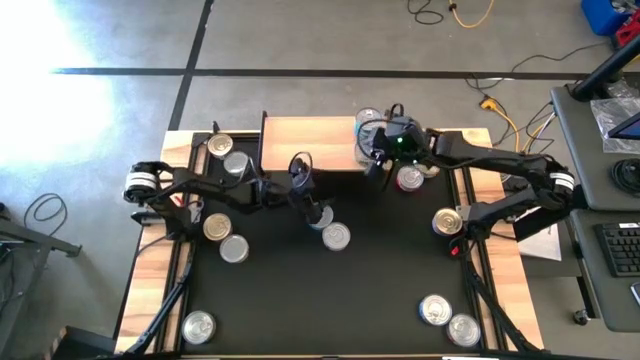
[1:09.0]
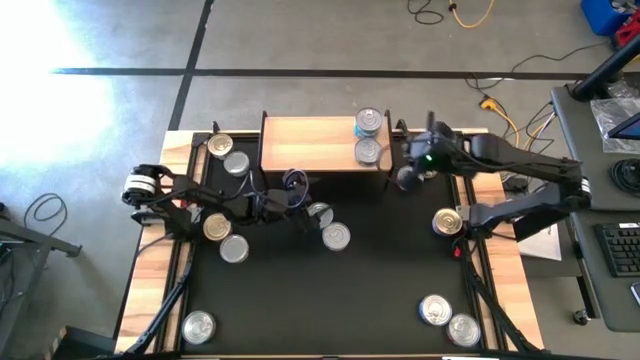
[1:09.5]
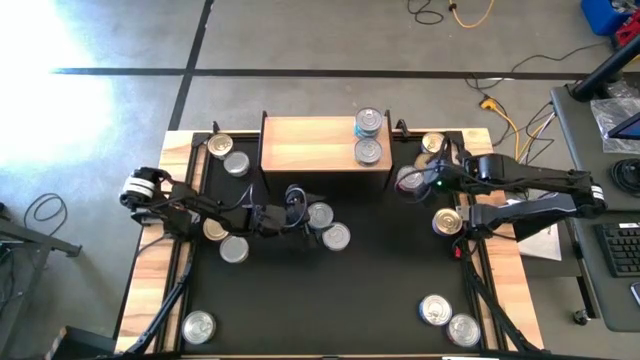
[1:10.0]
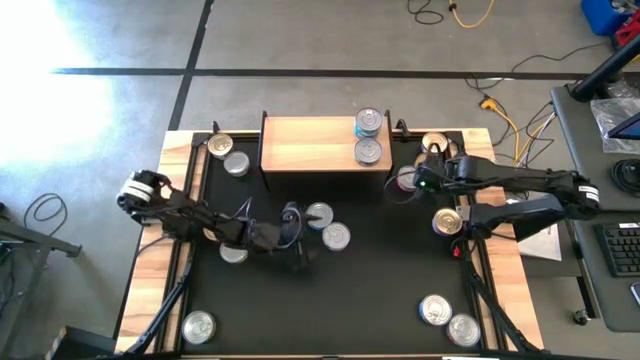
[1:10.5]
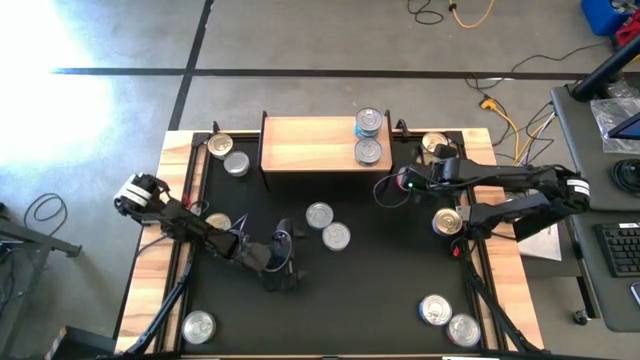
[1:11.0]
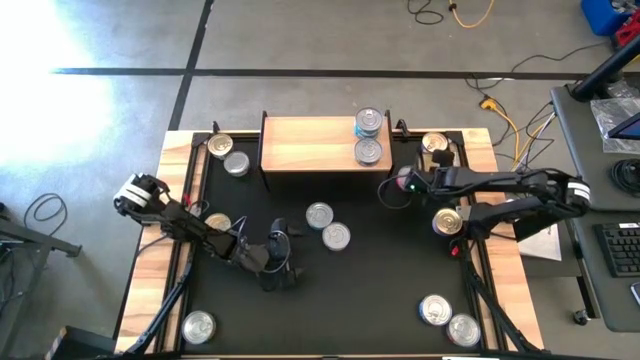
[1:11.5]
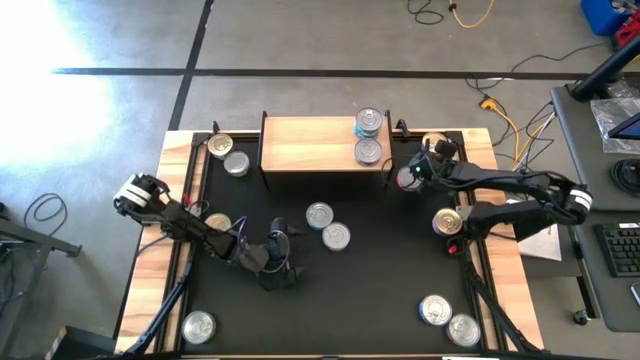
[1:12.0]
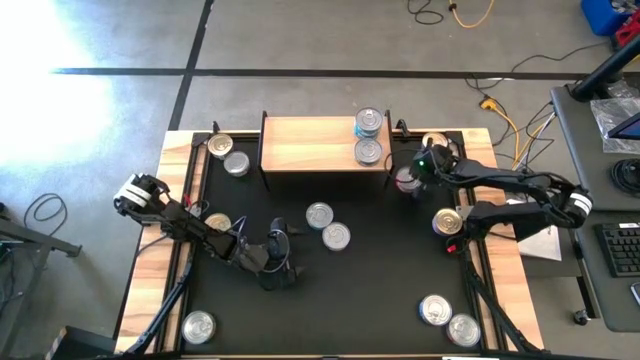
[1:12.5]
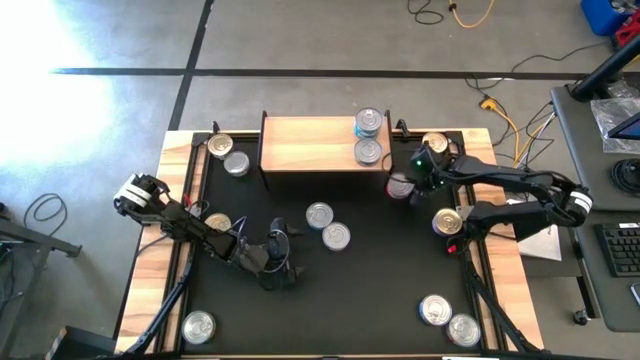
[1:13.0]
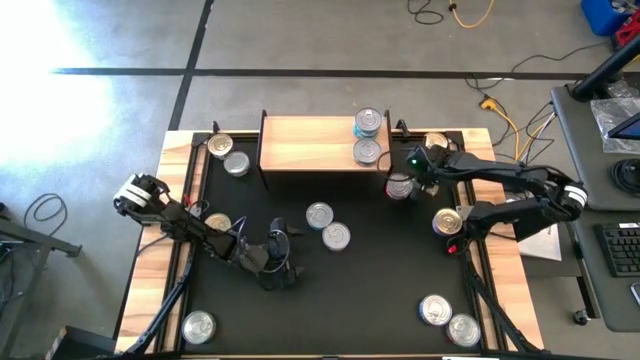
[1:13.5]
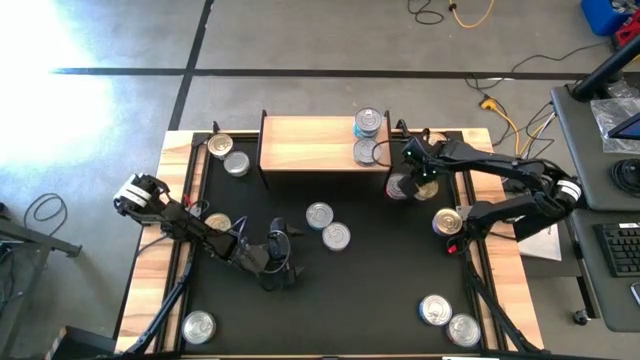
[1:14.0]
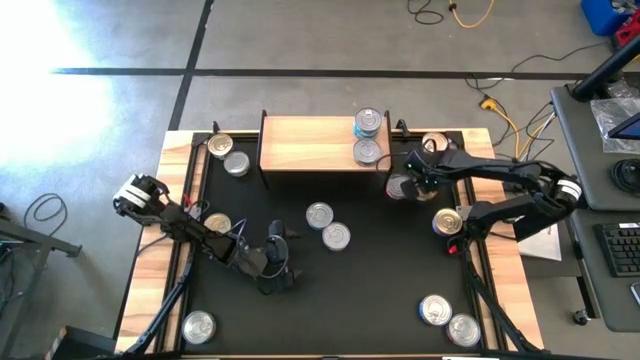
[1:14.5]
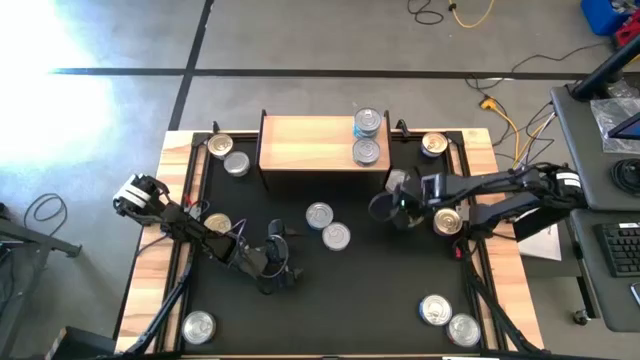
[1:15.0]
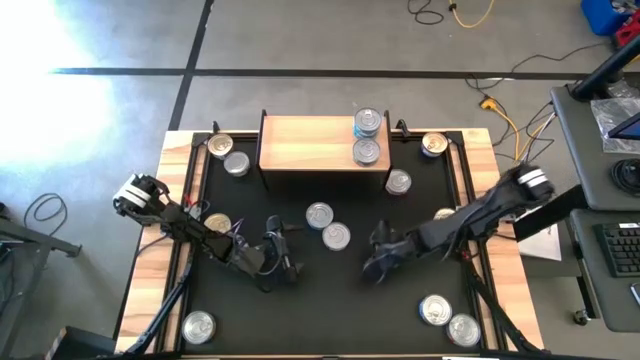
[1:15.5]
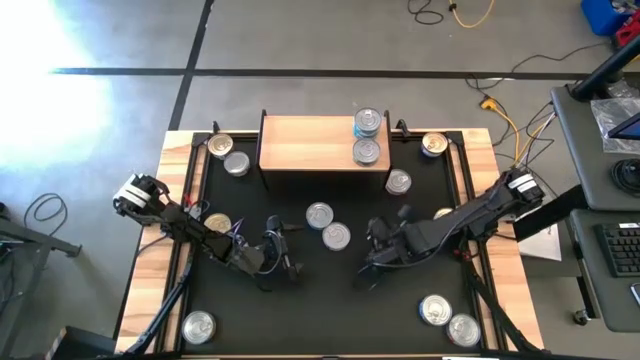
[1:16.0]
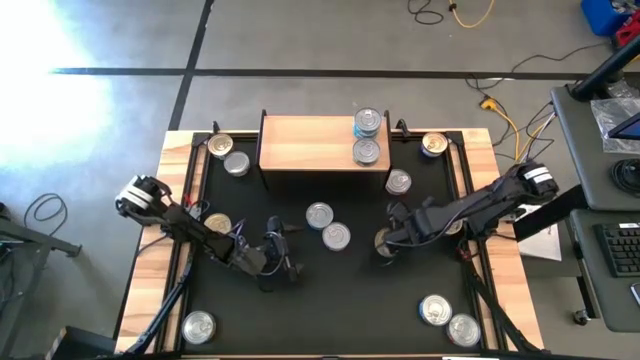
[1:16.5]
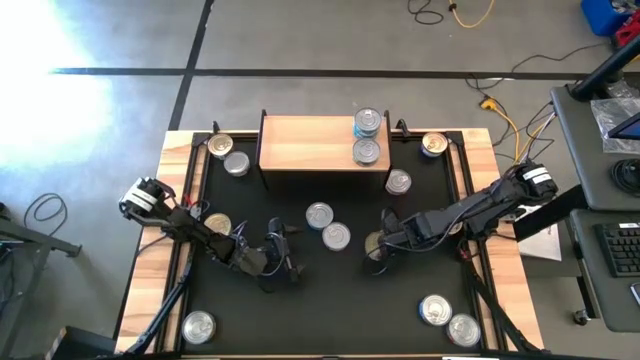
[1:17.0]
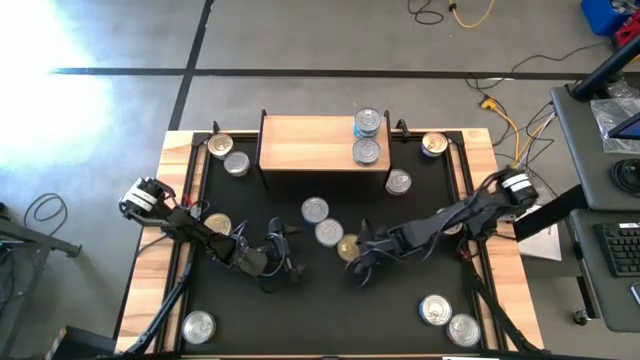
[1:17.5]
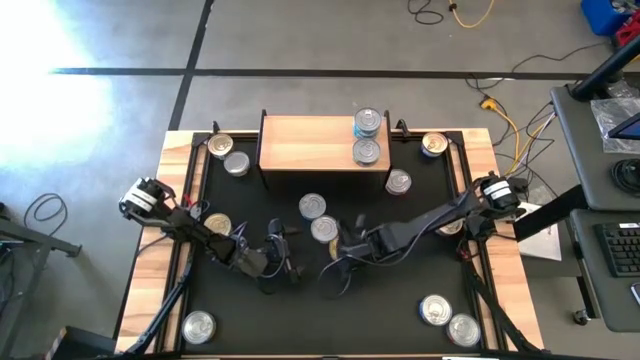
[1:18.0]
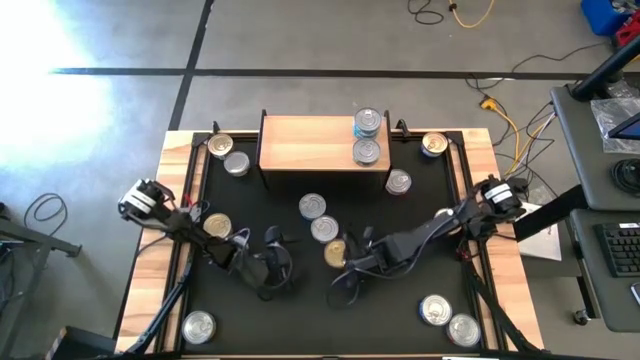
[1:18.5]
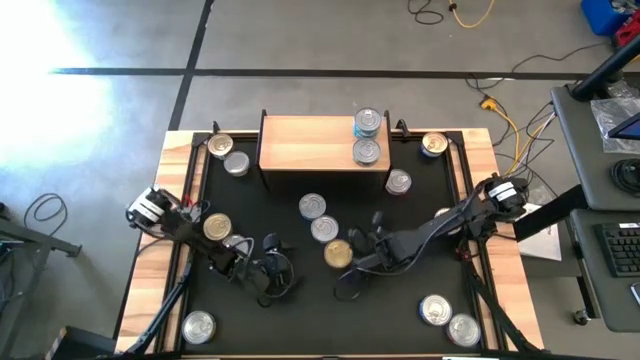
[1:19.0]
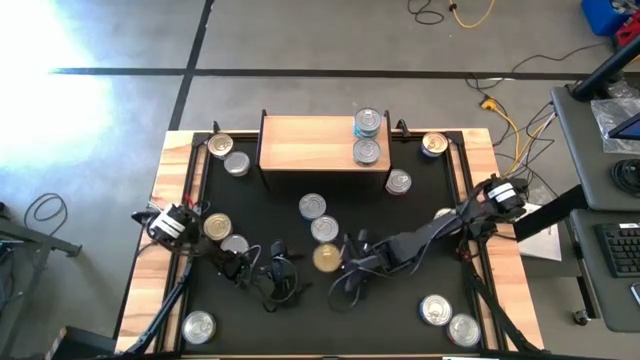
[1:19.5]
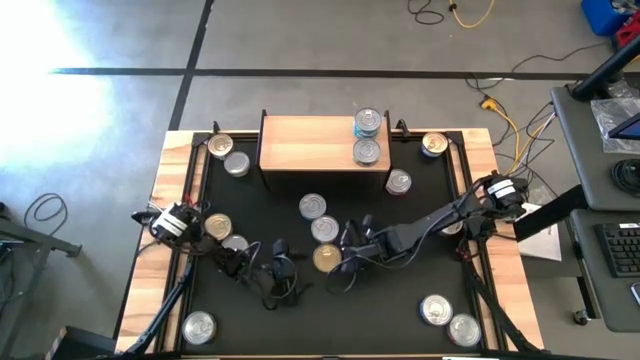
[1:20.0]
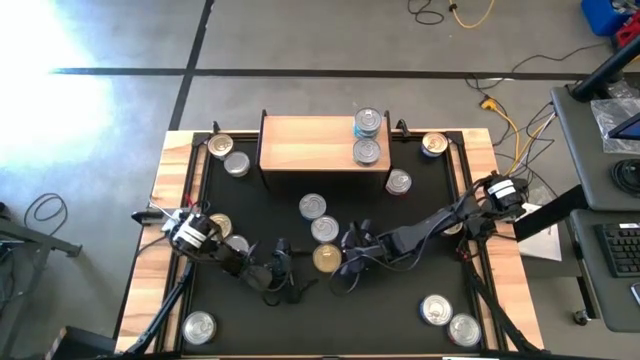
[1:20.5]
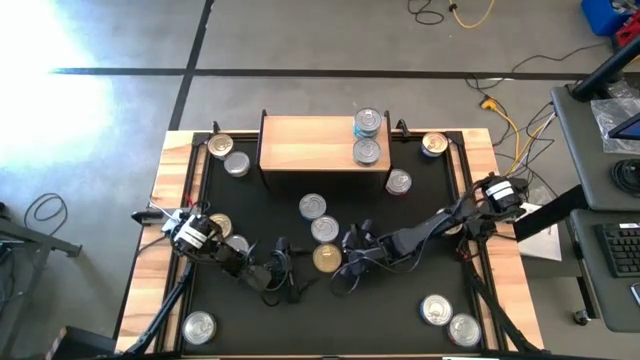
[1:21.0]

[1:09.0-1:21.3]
Task: Stack canned seafood by type on shelf
Stack the green tuna can on top of the green tuna can on the shelf

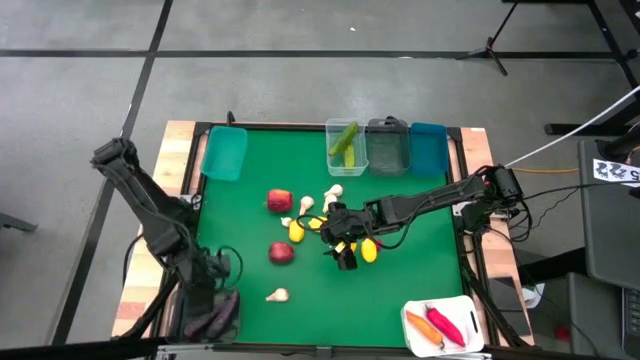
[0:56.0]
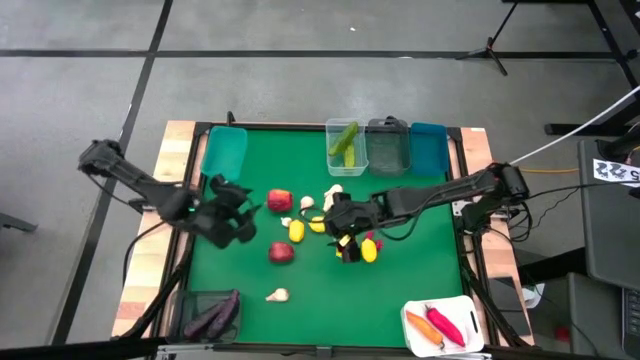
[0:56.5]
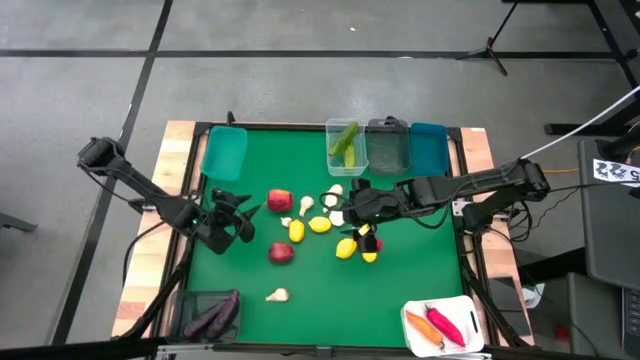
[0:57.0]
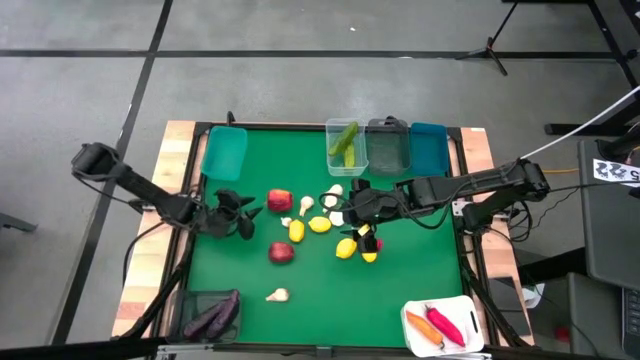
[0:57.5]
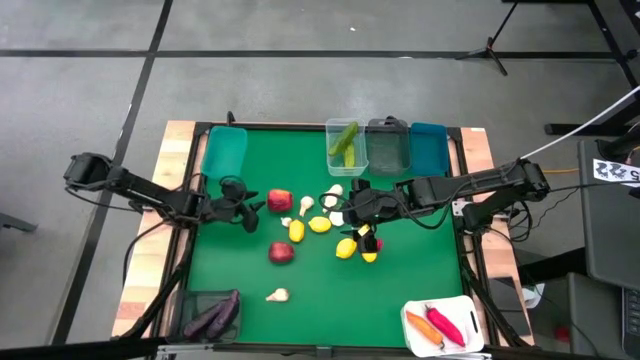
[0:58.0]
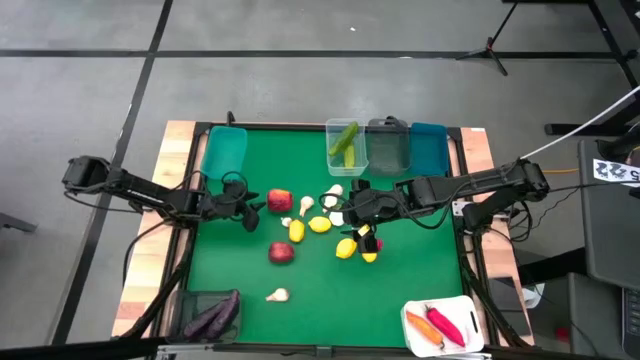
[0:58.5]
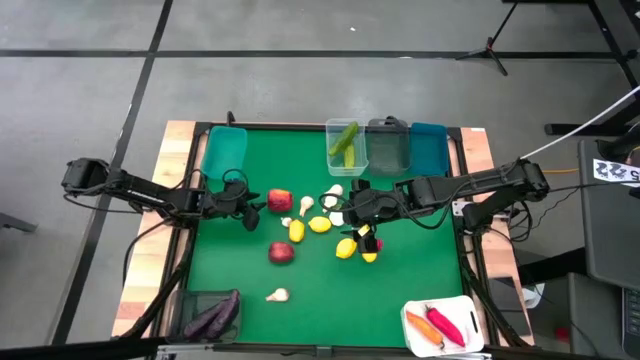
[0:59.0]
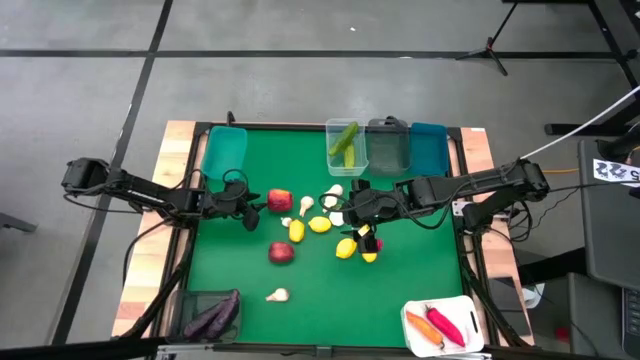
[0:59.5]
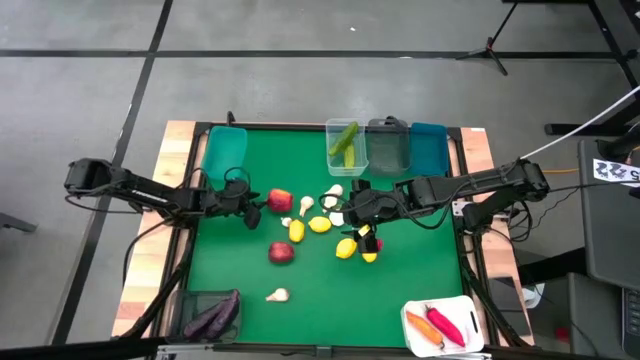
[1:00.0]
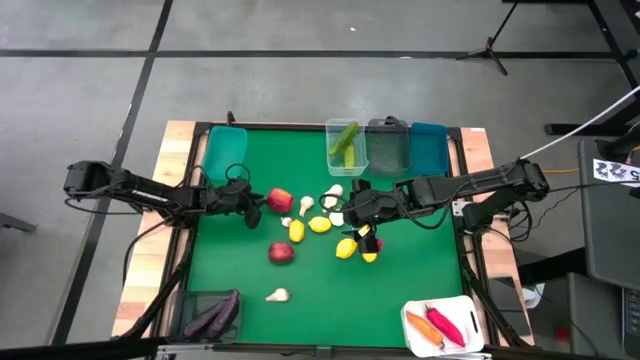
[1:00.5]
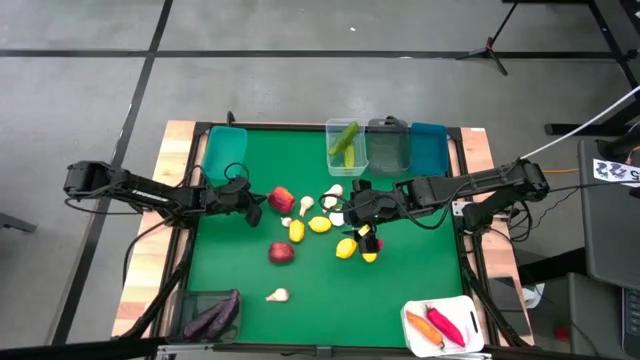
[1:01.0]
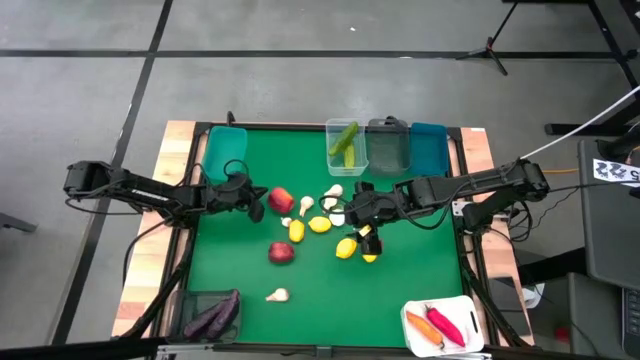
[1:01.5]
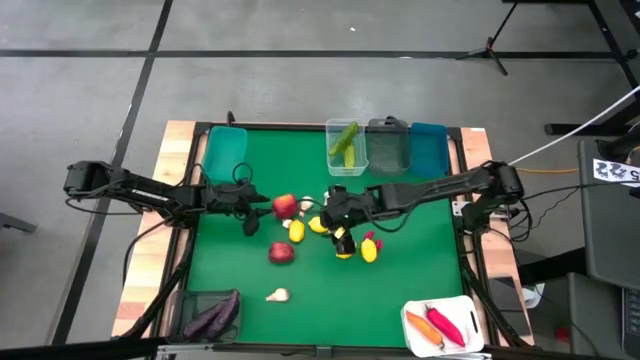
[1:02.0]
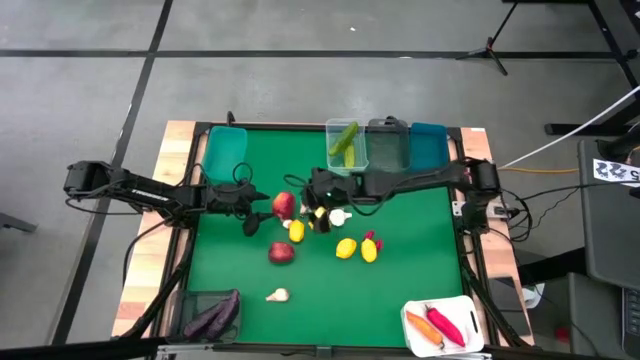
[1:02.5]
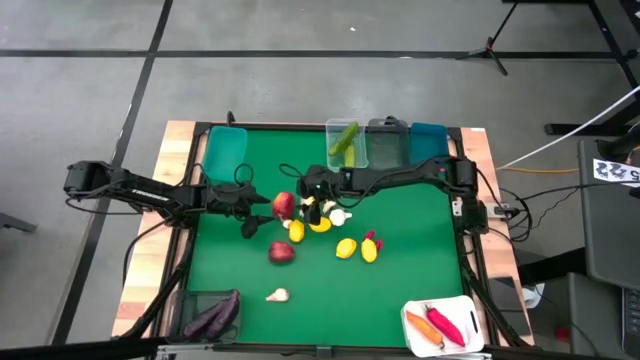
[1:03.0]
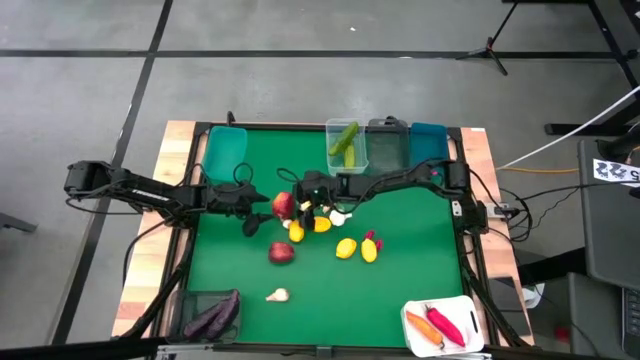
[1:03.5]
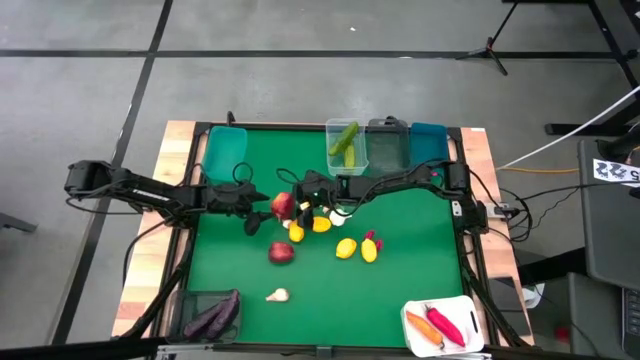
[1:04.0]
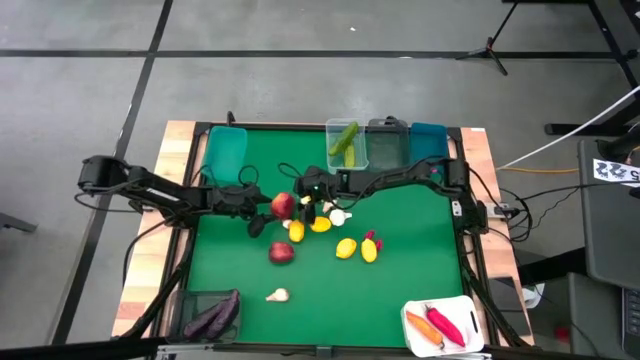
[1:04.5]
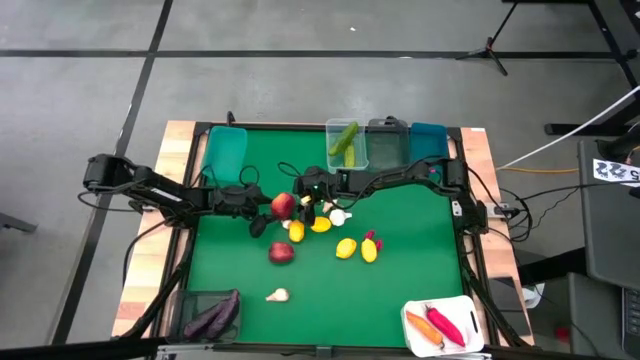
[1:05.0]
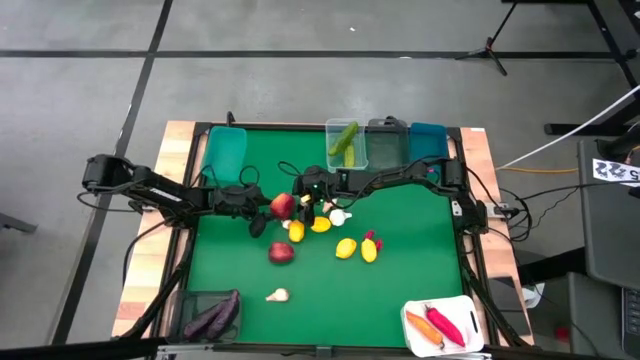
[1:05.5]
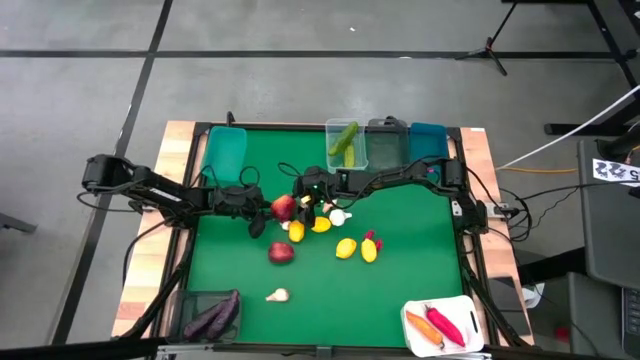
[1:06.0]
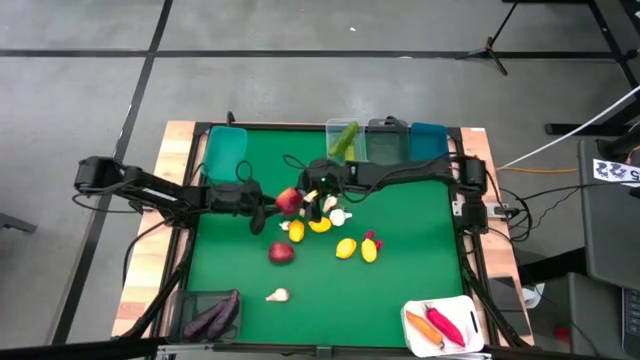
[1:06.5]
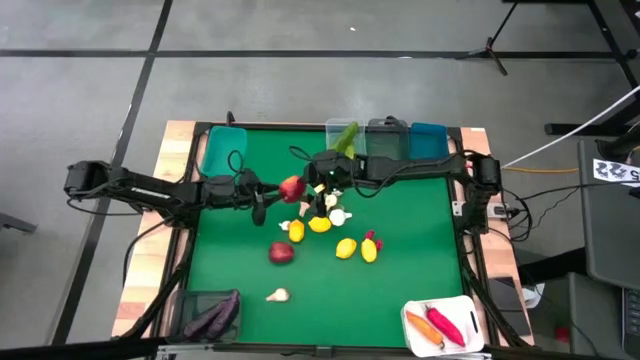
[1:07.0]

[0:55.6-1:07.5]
Task: Sort produce into baskets
Put the red apple into the green bin
